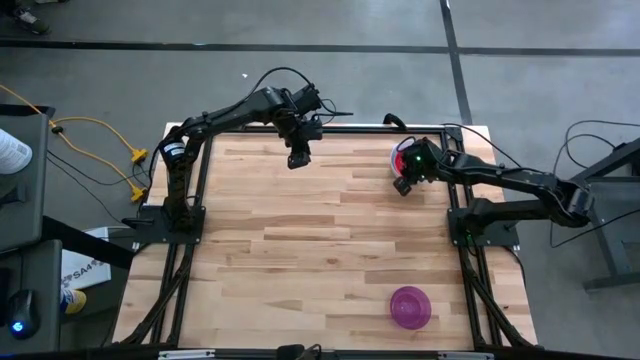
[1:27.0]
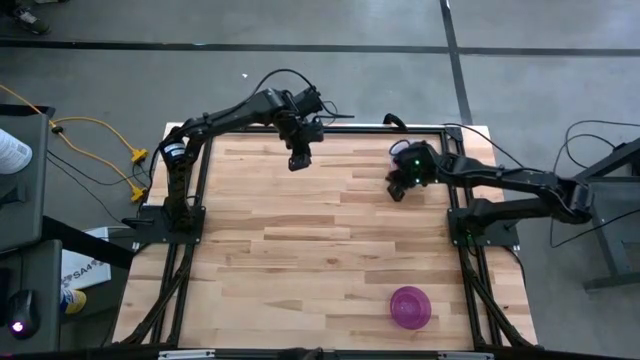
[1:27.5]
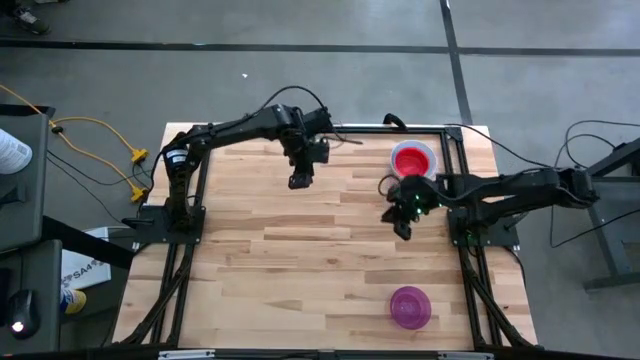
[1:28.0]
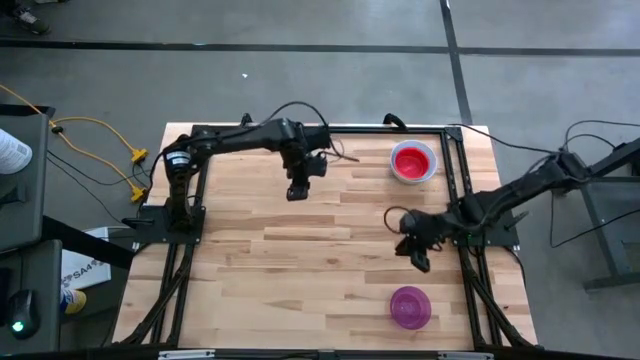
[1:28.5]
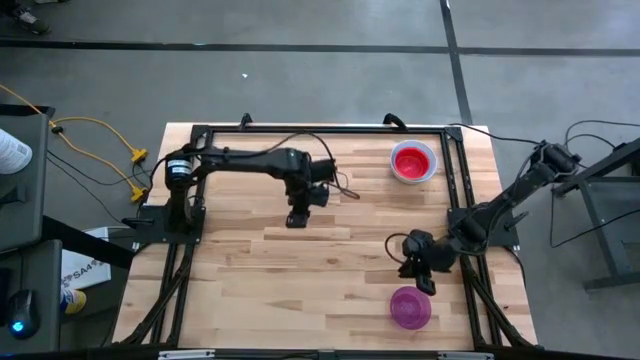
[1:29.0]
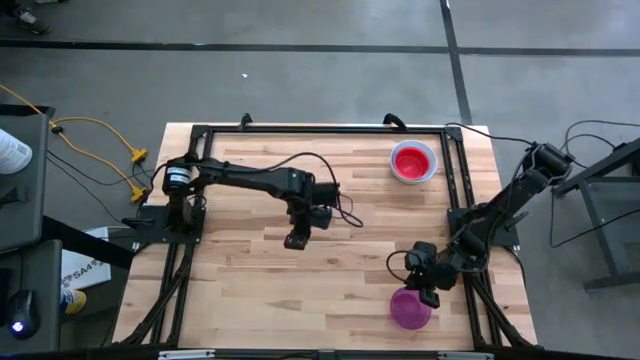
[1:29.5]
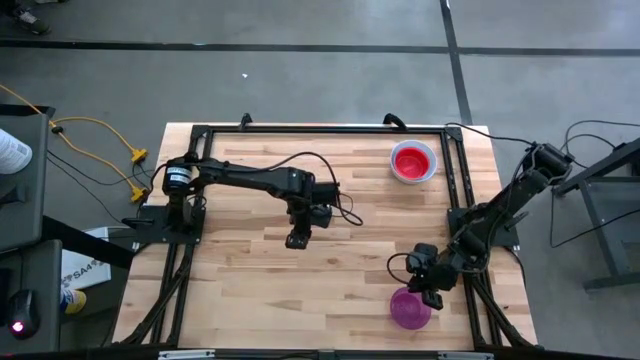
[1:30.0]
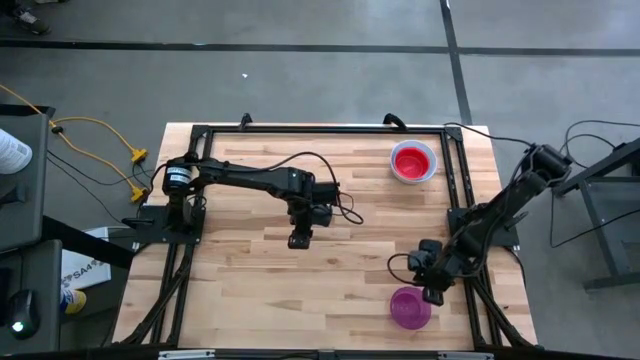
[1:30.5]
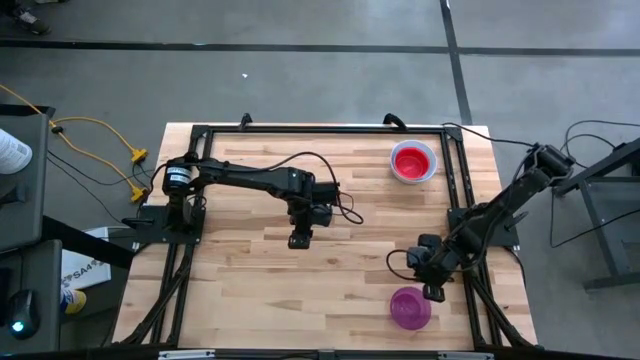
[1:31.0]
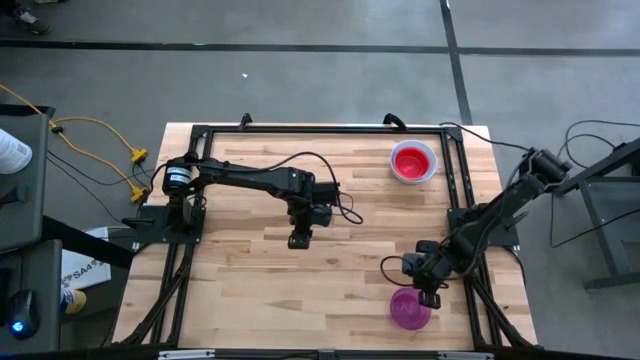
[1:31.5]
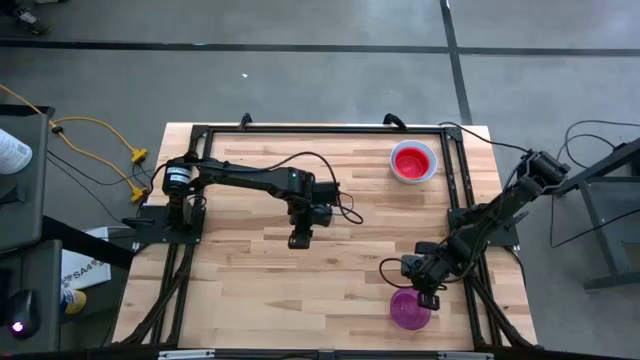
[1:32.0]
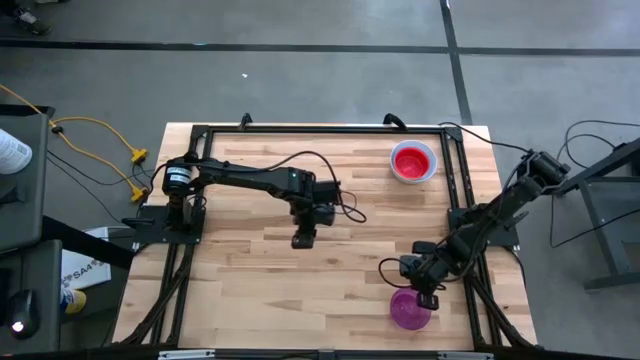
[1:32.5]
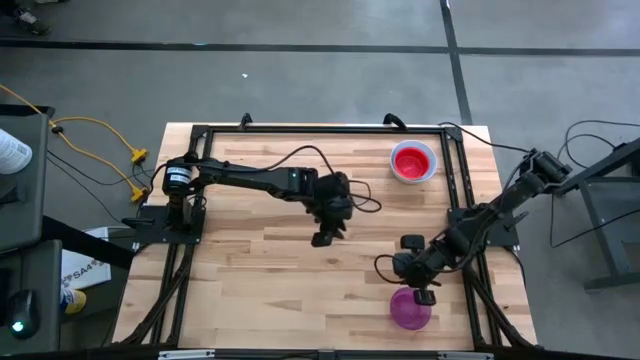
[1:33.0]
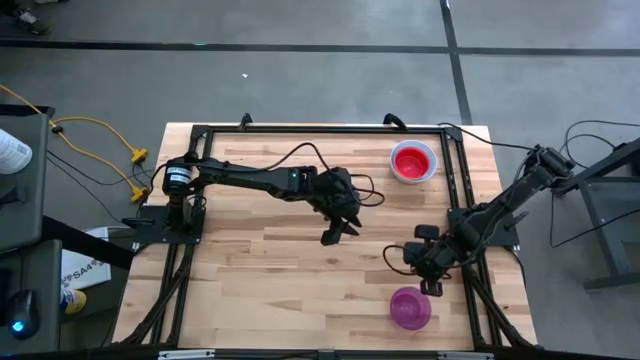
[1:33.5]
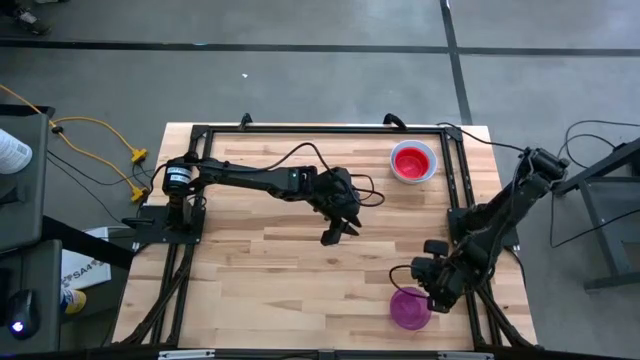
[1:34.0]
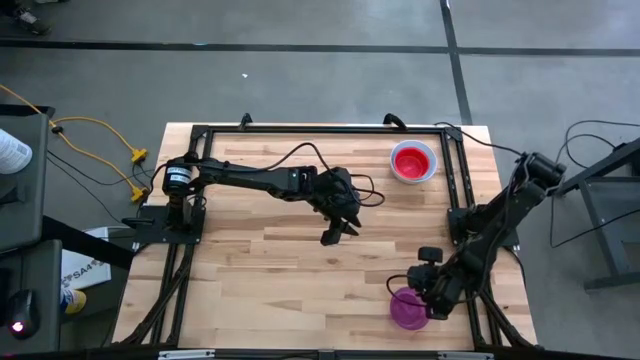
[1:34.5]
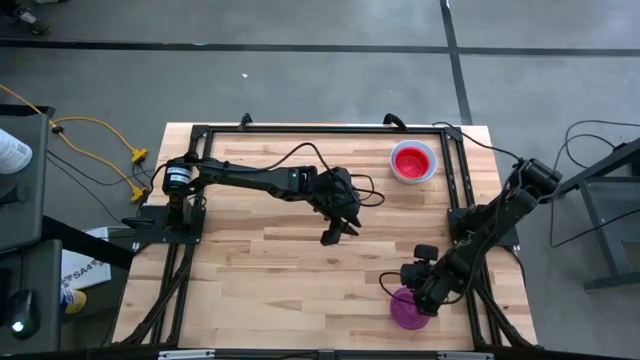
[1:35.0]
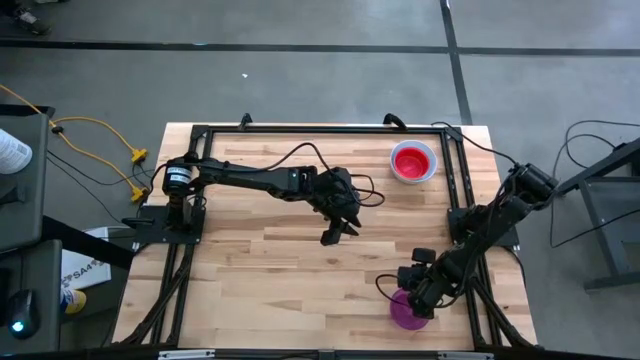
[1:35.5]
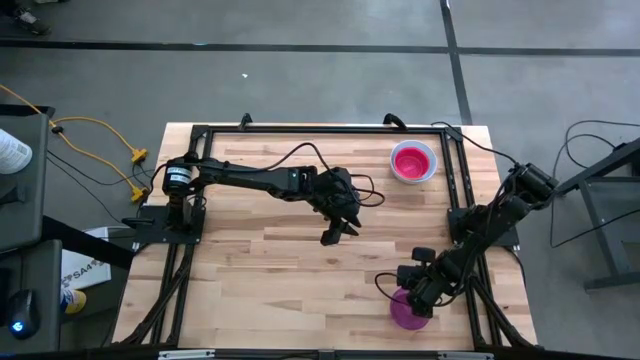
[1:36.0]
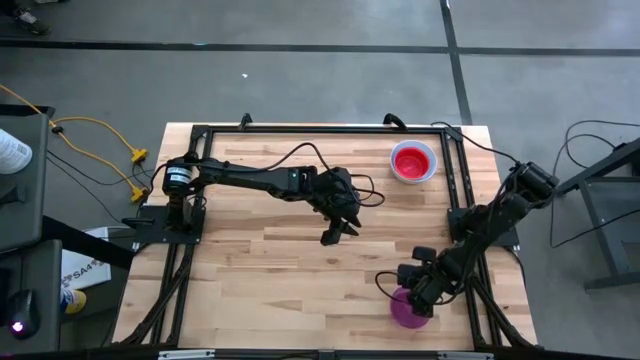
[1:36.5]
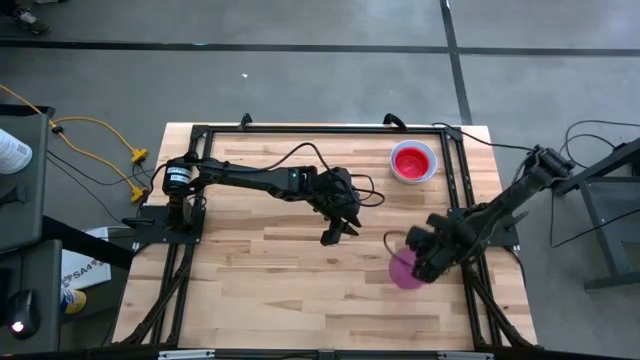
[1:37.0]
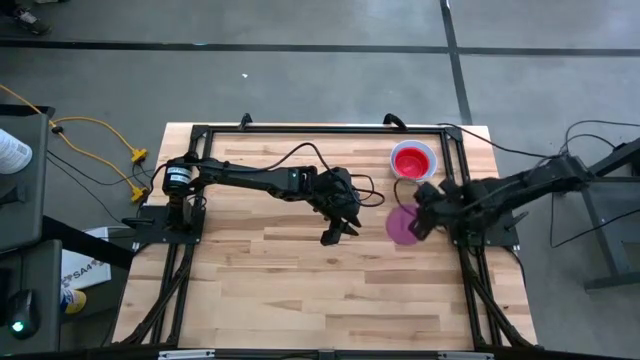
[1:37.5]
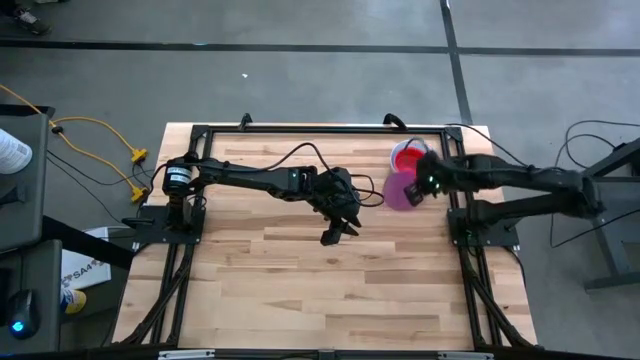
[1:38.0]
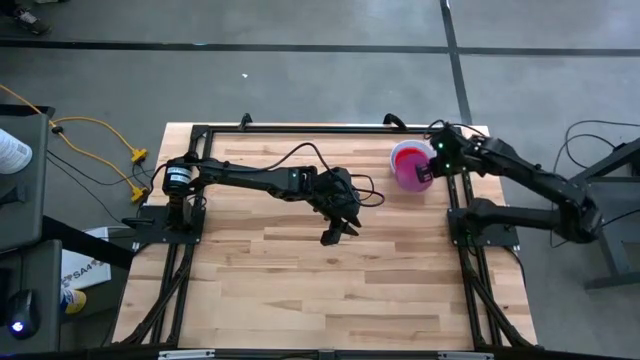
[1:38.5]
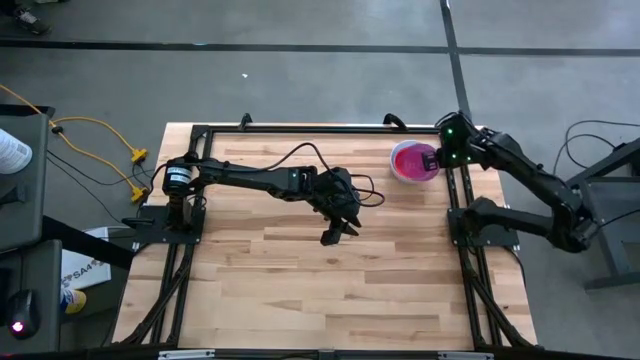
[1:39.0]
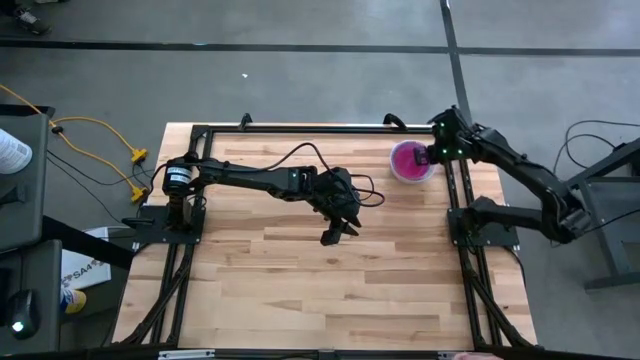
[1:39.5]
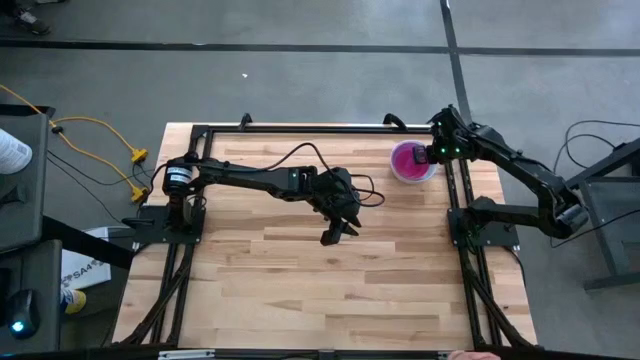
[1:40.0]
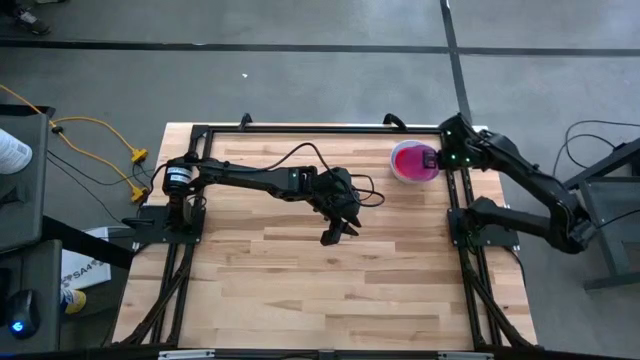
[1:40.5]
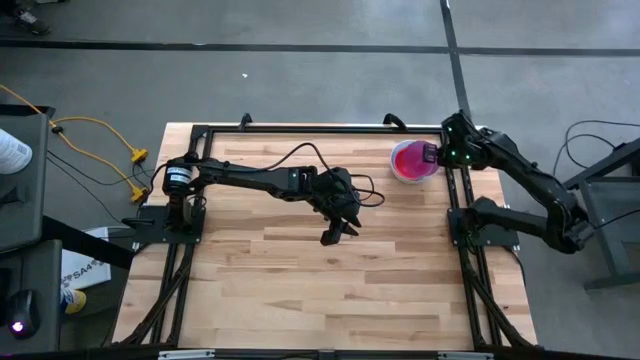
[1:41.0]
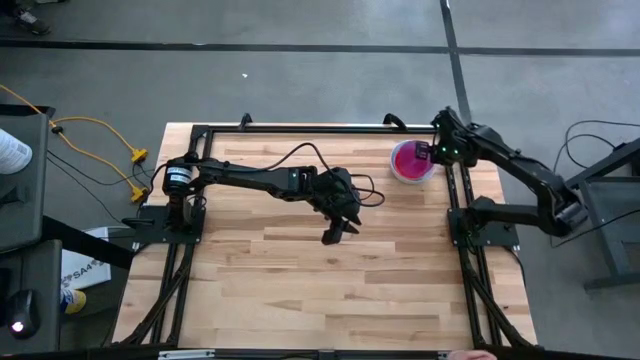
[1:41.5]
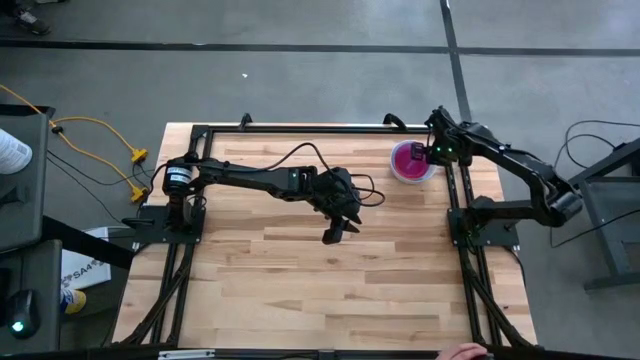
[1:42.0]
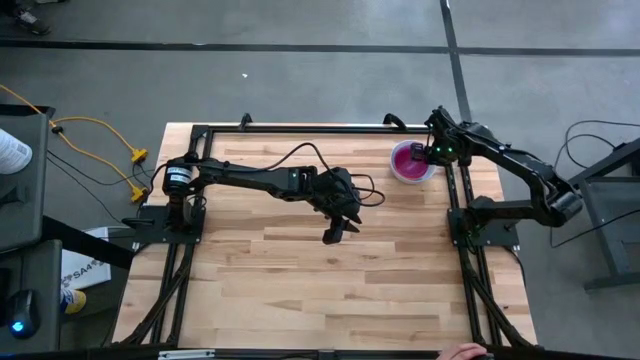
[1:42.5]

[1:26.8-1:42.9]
Stack the purple bowl on top of the pink bowl

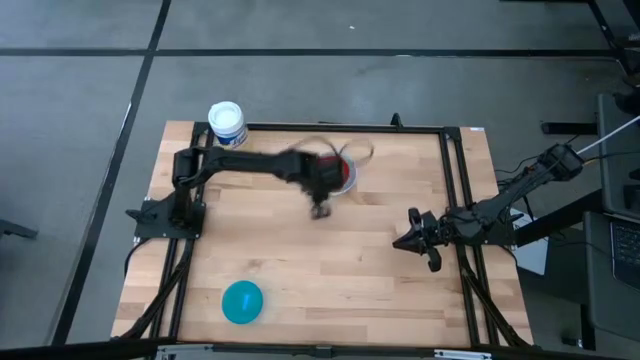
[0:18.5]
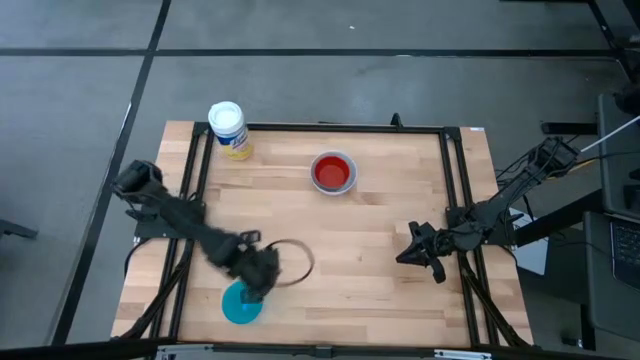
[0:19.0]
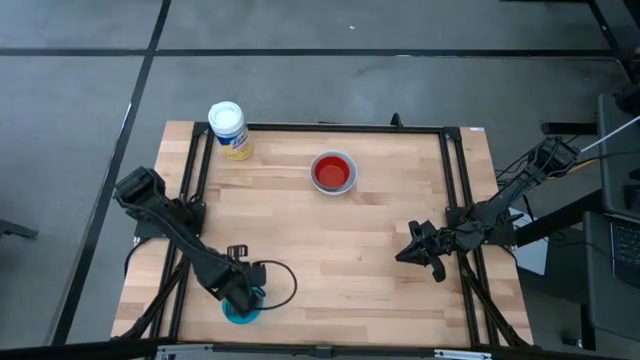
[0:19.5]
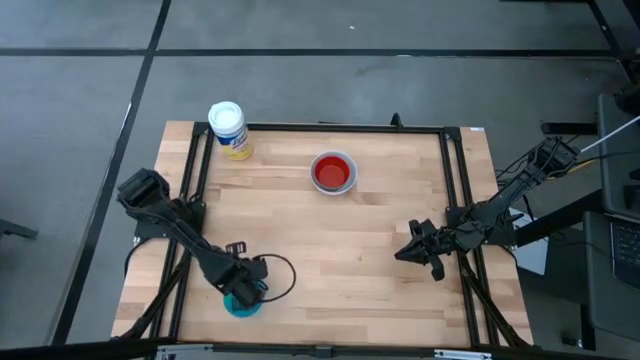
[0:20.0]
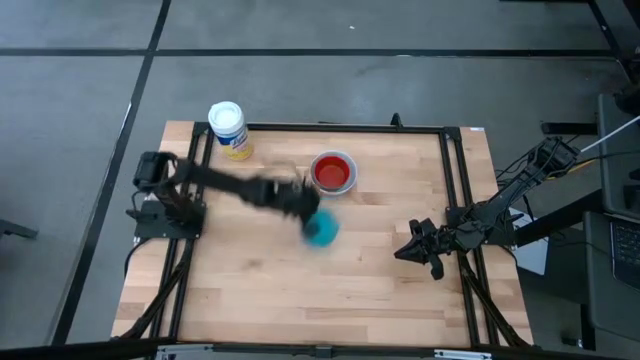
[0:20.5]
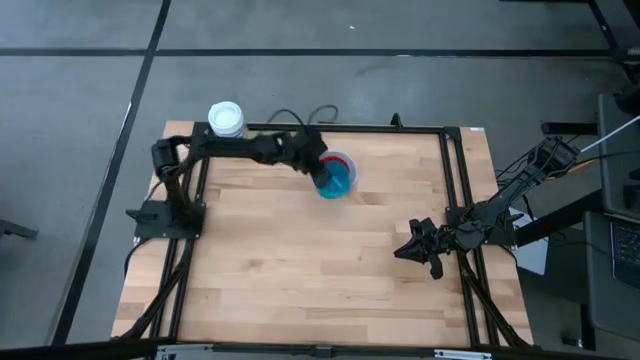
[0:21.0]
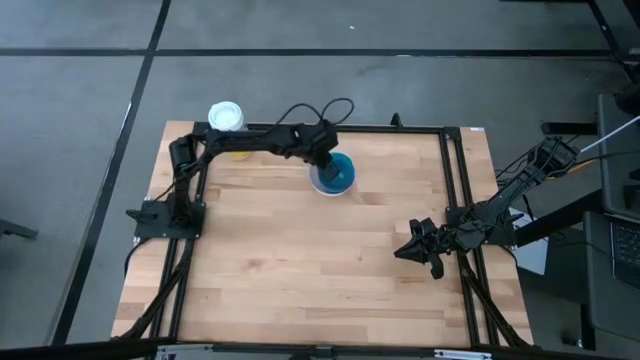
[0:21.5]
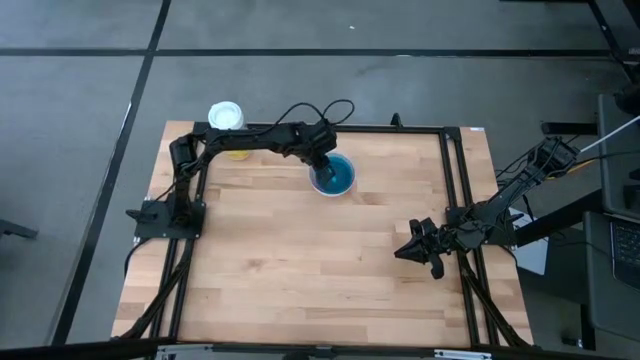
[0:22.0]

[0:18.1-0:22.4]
Stack the light blue bowl on the red bowl
